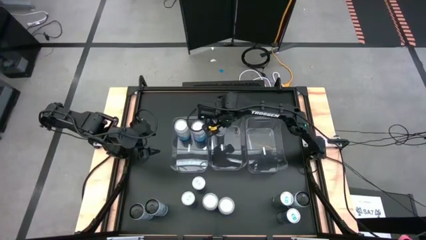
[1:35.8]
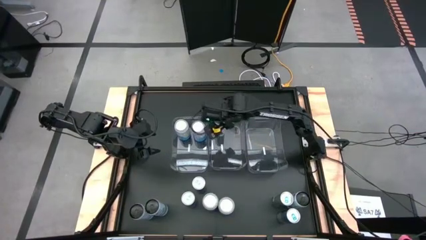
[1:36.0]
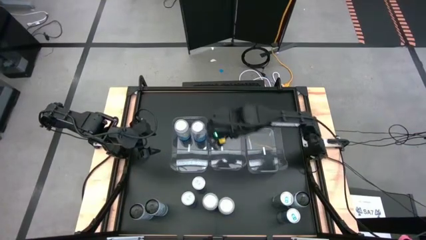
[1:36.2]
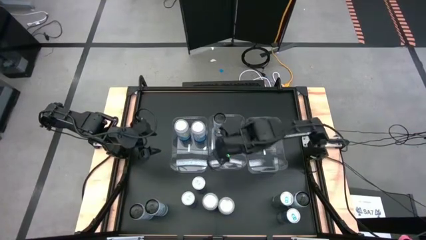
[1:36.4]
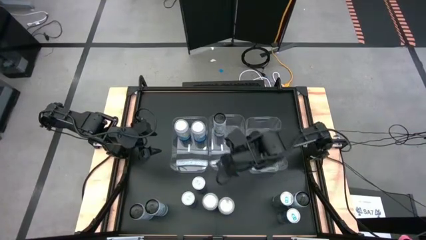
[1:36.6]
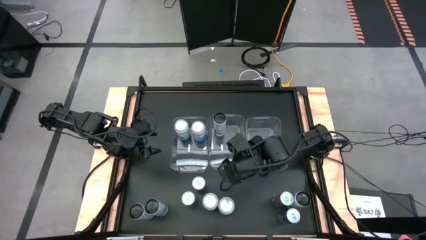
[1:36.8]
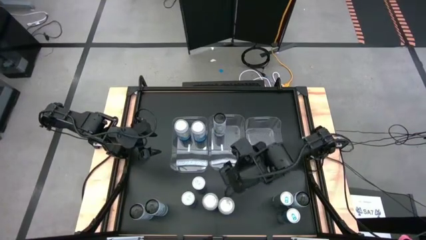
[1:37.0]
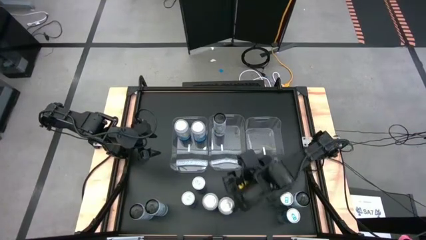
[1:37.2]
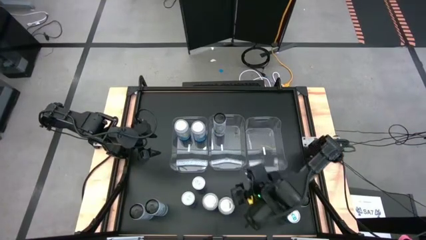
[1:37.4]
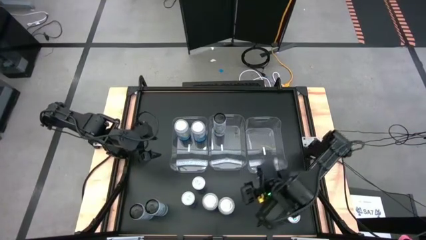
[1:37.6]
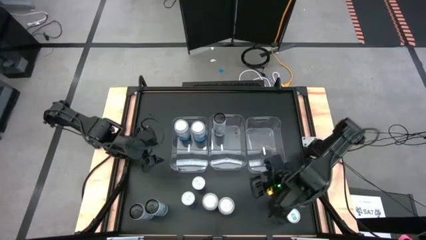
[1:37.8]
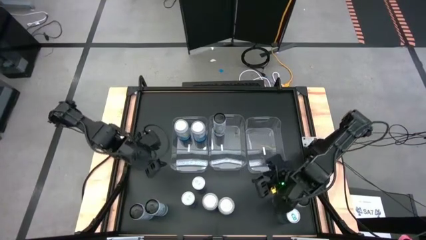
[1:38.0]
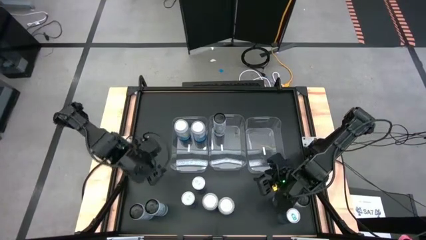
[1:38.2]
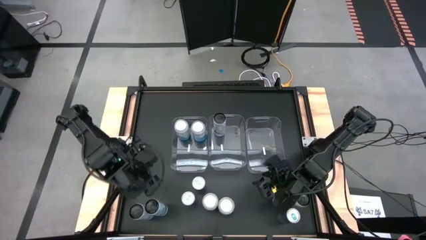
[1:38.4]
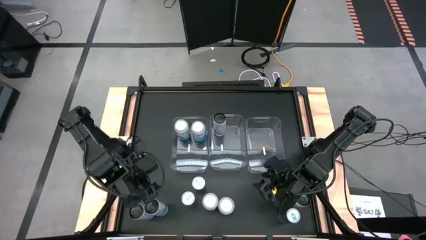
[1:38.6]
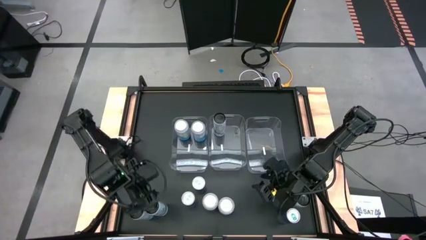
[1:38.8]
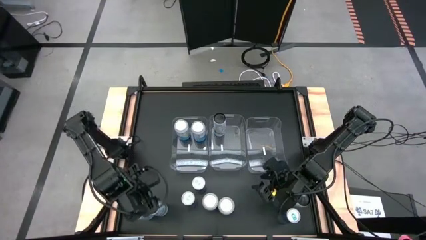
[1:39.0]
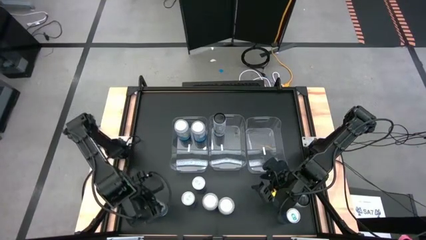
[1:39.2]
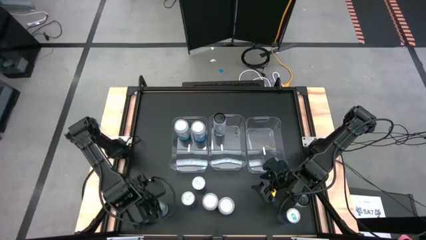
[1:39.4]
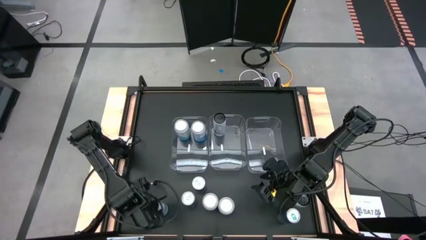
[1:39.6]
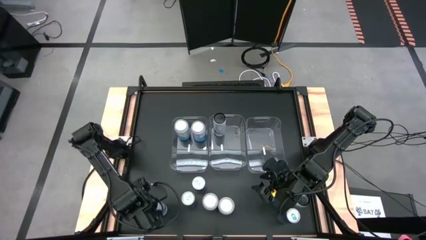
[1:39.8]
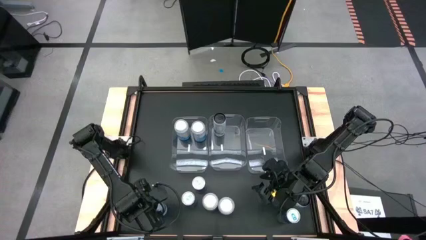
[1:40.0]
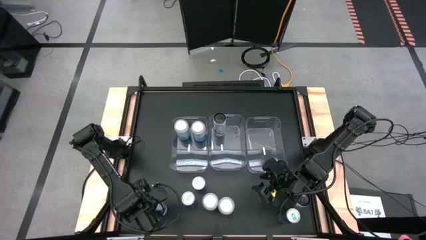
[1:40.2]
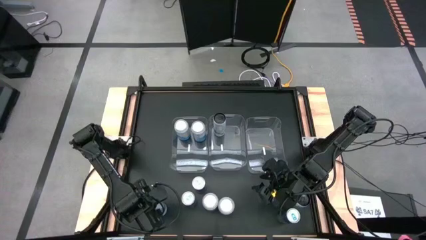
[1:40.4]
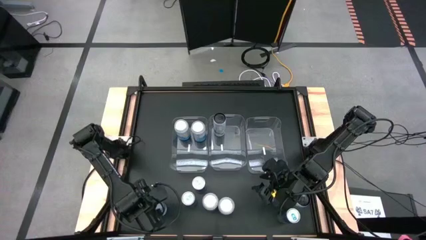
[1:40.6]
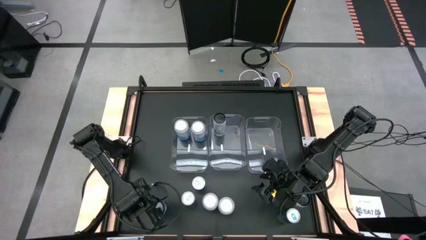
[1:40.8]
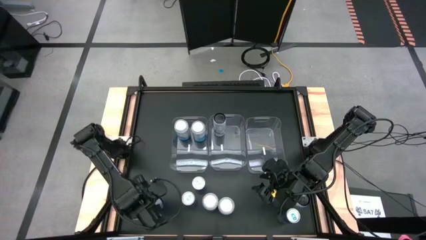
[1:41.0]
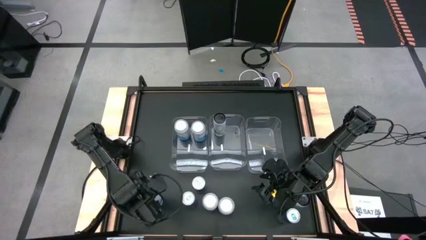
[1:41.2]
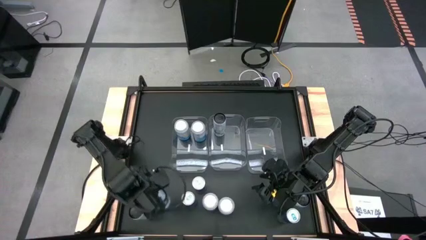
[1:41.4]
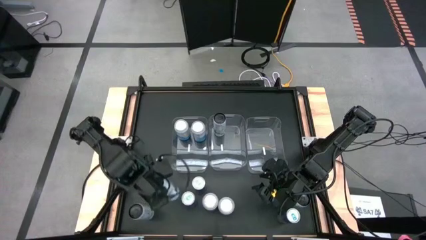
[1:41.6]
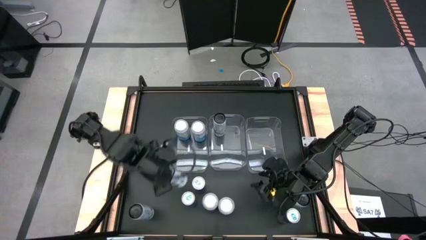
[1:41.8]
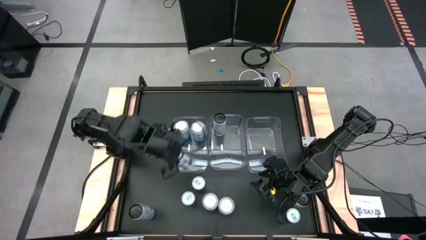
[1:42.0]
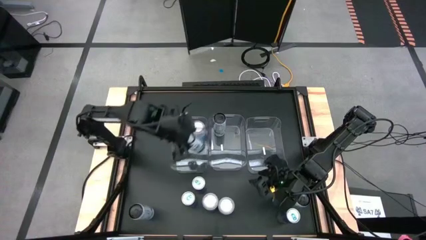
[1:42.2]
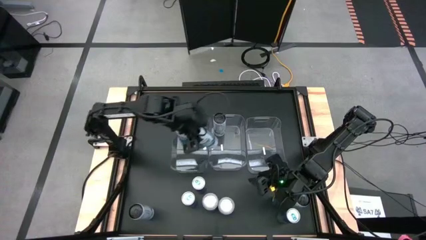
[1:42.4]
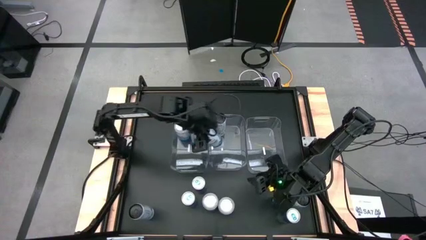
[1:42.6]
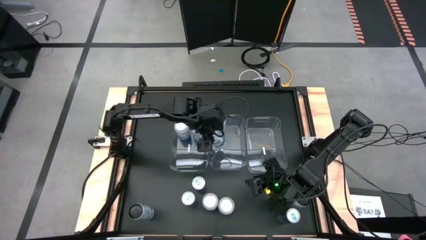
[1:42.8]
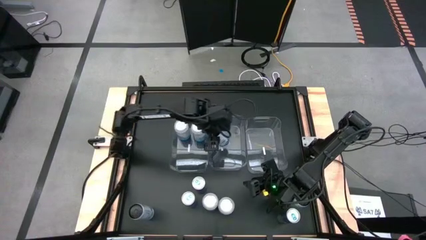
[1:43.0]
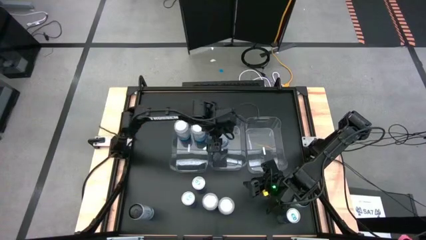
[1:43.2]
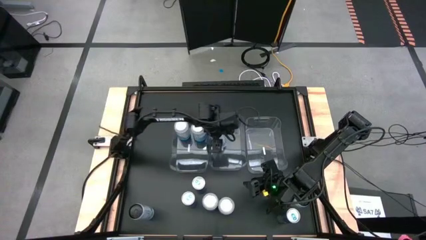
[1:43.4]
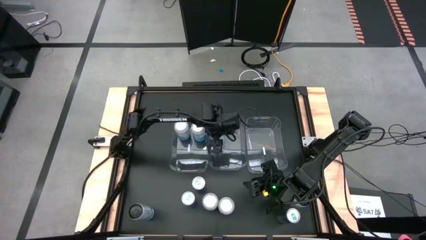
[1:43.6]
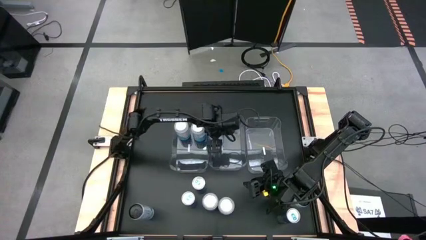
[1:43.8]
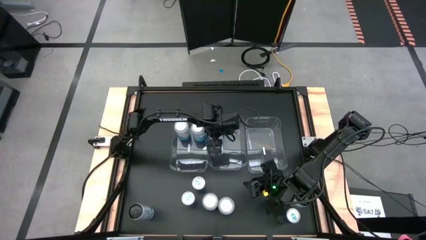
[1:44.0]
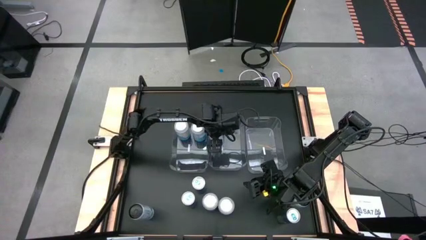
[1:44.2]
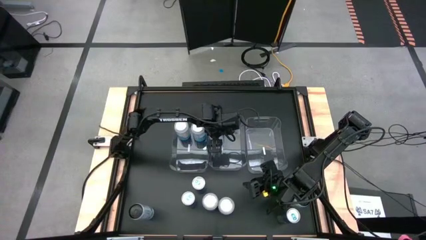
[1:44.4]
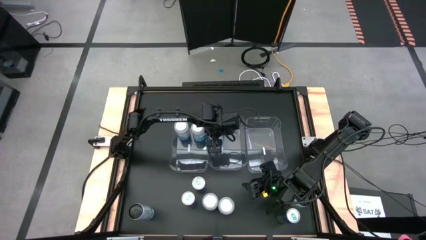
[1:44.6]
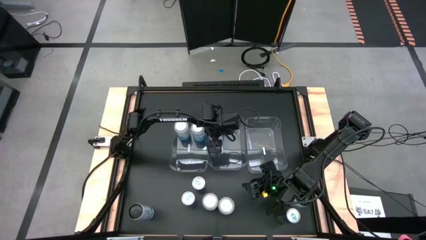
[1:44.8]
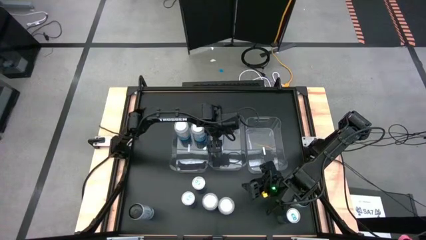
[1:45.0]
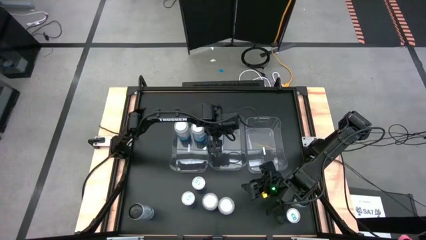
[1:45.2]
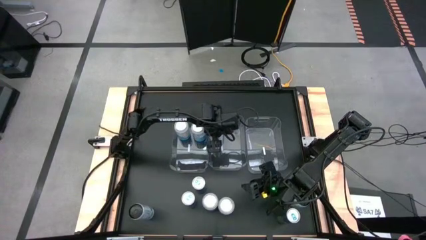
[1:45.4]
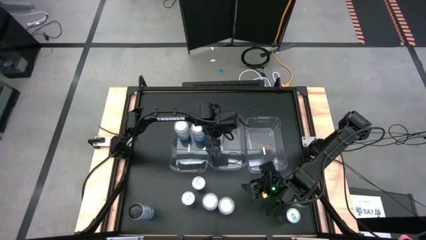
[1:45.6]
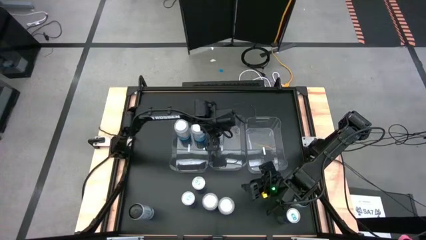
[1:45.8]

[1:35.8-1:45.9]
Task: Sort soda cans
Put the middle white soda can into the middle transparent bin

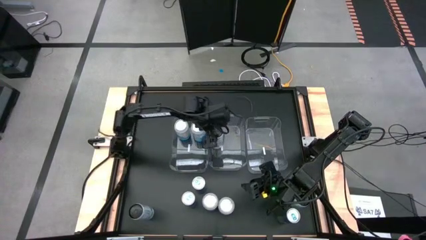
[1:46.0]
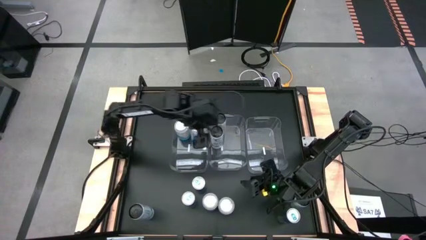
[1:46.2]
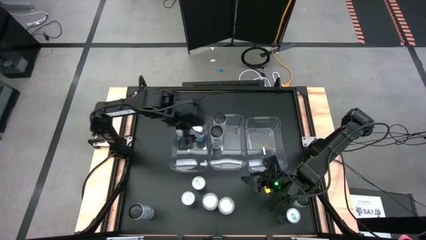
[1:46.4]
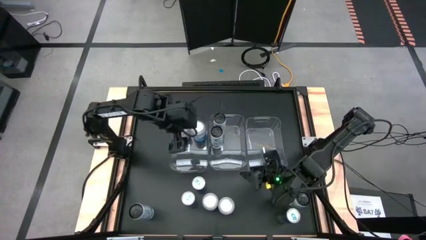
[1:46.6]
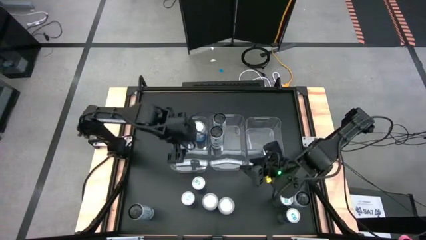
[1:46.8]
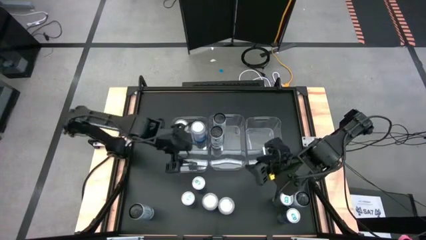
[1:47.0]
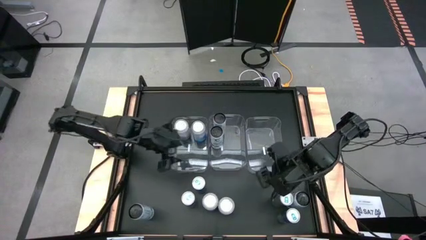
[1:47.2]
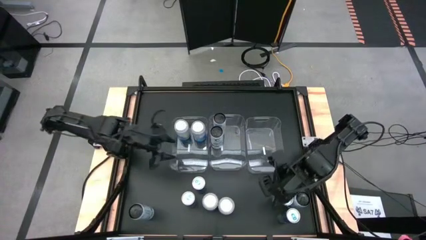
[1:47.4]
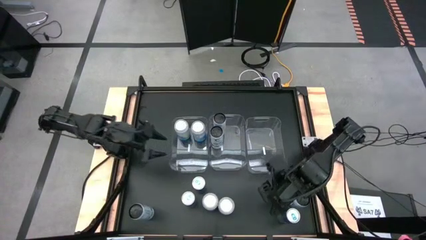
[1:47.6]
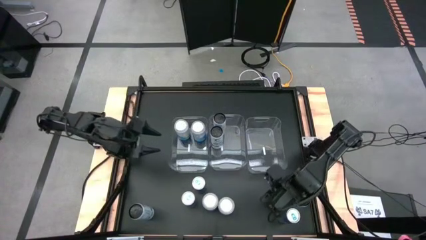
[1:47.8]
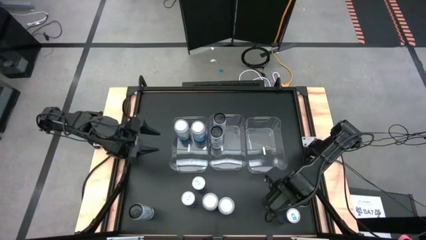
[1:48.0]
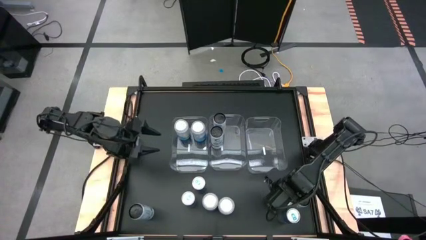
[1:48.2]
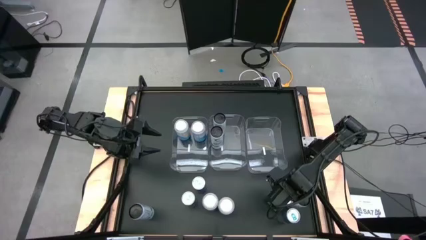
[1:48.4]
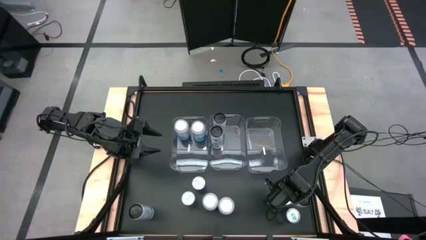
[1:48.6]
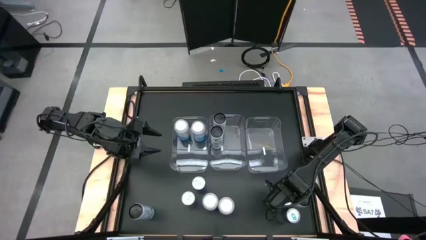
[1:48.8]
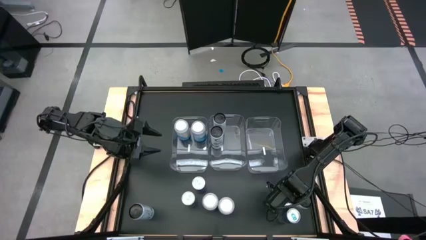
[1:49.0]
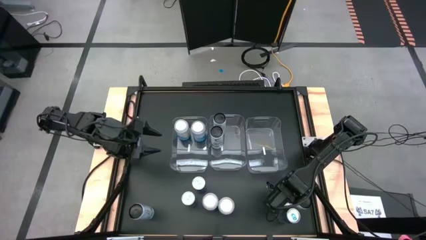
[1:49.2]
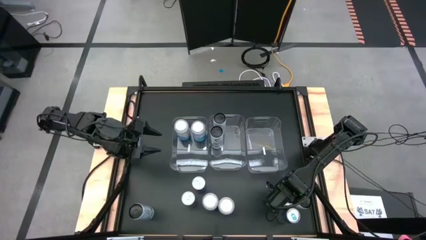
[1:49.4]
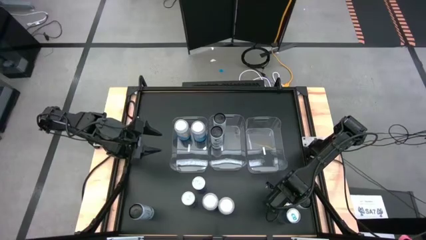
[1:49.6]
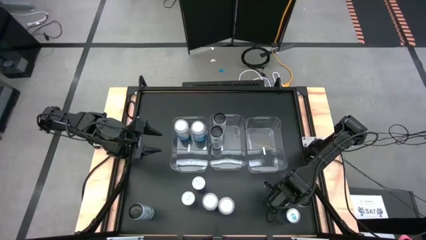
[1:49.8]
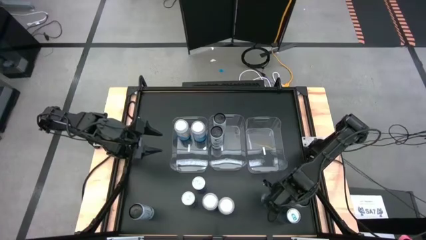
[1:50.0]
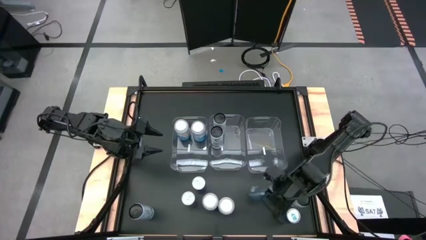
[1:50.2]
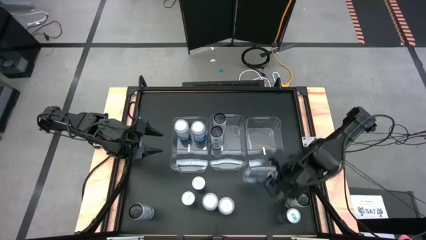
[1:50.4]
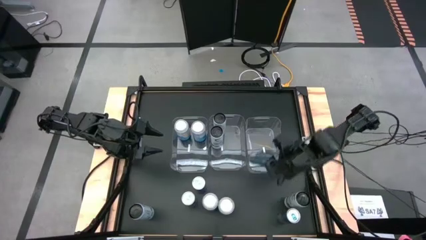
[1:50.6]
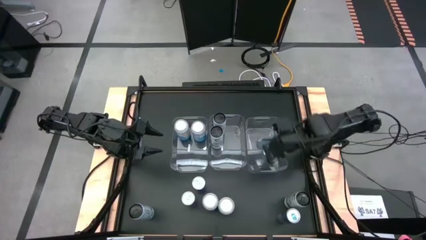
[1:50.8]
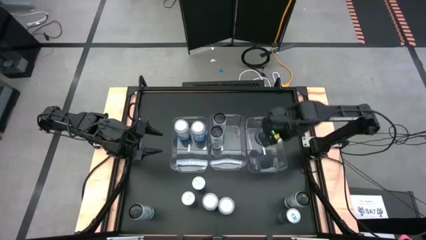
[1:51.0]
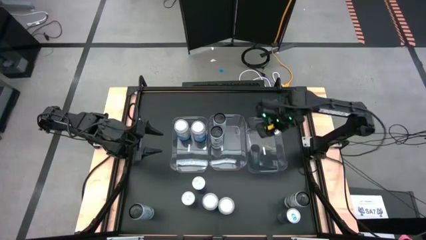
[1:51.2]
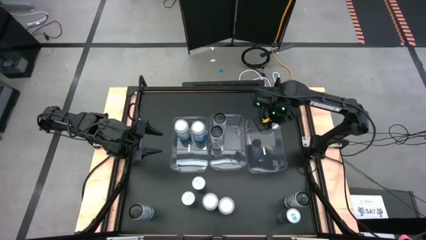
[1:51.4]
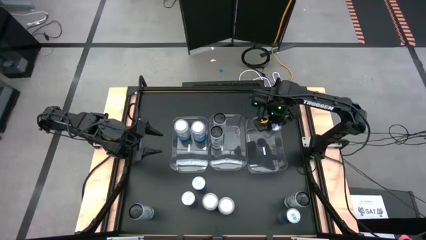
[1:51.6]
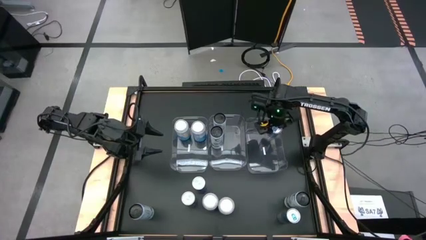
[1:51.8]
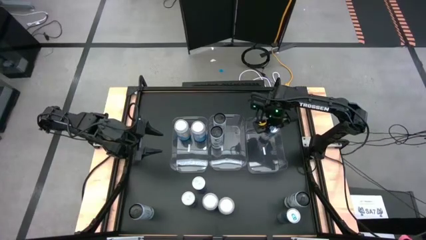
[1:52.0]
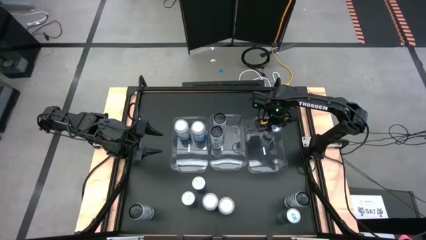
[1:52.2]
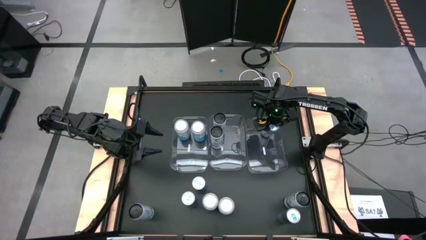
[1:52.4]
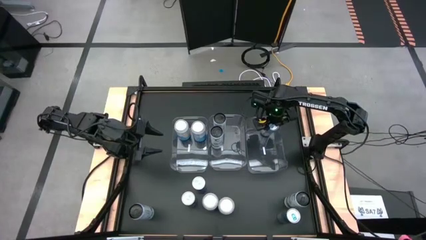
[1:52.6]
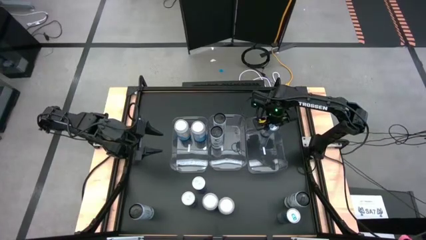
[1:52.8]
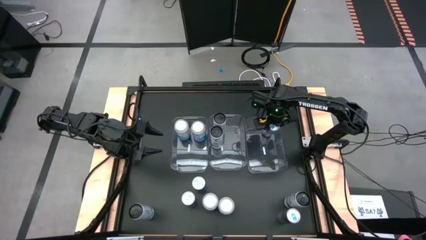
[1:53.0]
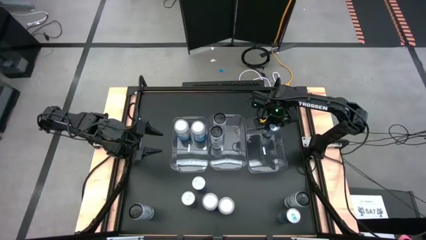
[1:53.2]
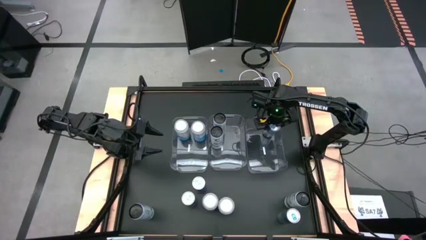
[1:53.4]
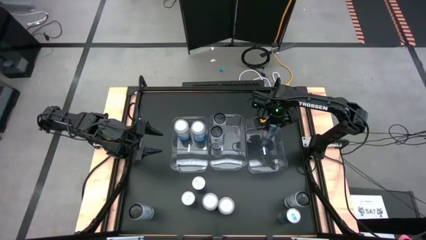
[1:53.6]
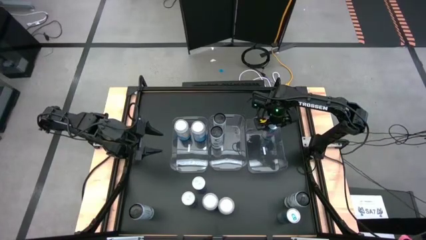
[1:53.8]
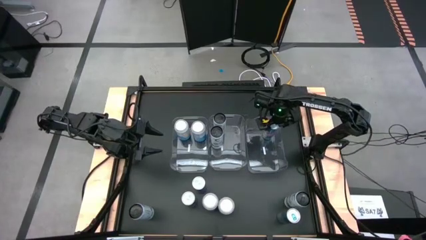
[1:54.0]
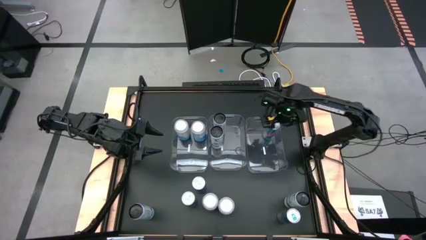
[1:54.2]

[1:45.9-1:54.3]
Put the top right blue soda can into the right transparent bin
